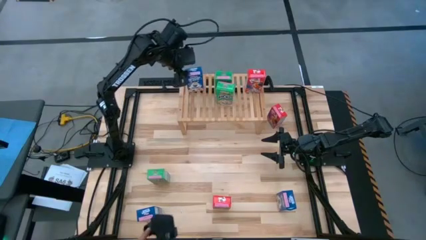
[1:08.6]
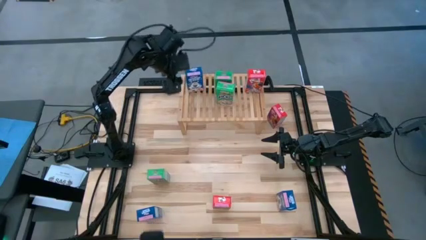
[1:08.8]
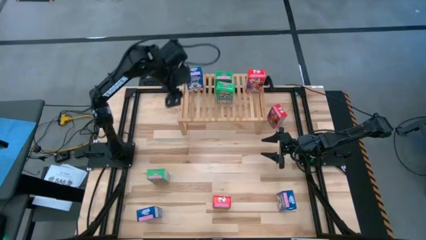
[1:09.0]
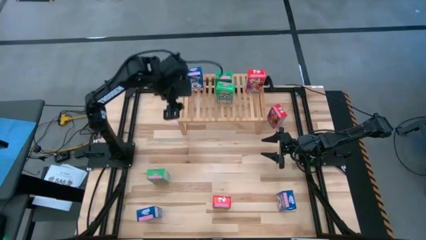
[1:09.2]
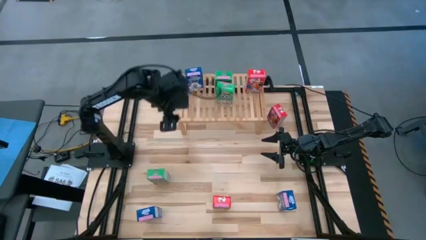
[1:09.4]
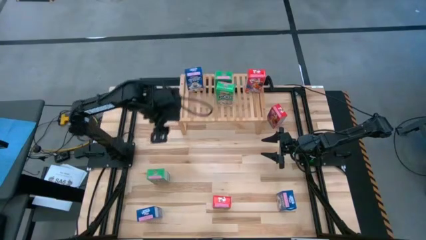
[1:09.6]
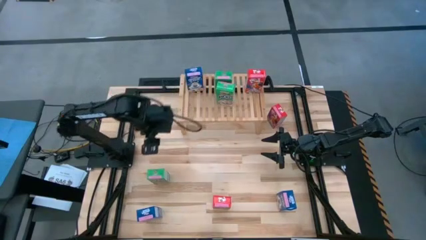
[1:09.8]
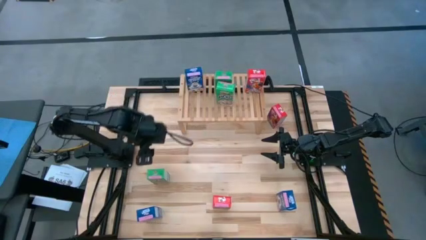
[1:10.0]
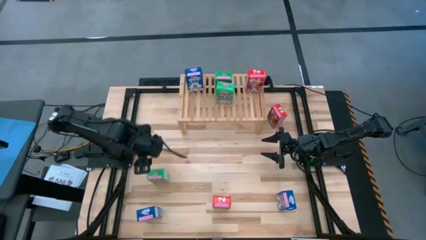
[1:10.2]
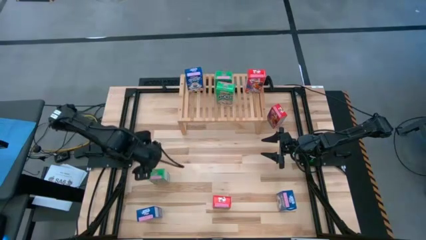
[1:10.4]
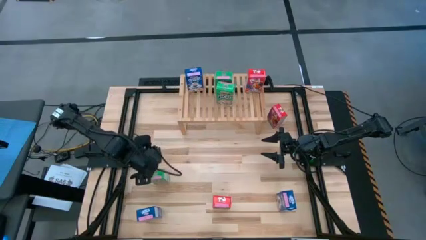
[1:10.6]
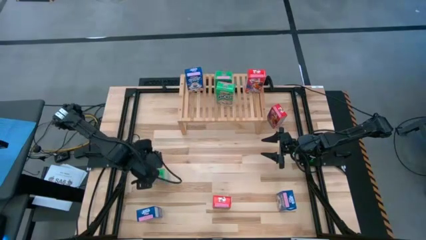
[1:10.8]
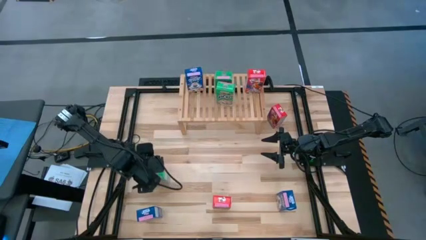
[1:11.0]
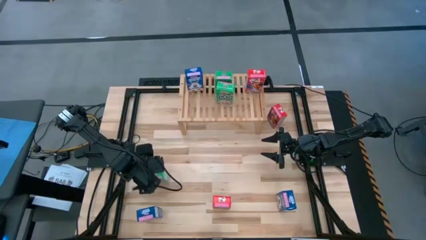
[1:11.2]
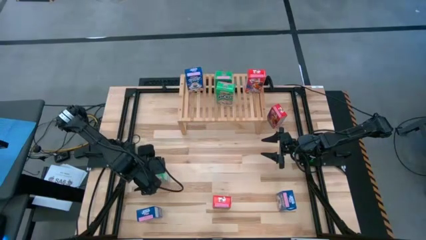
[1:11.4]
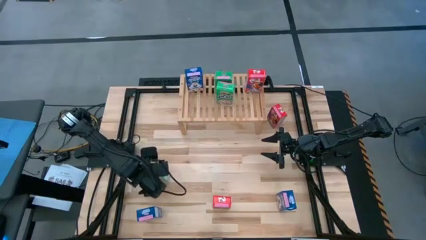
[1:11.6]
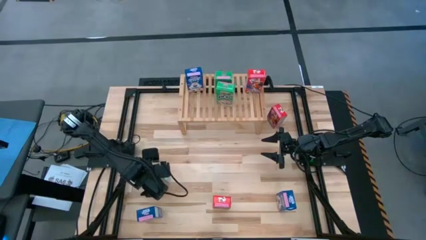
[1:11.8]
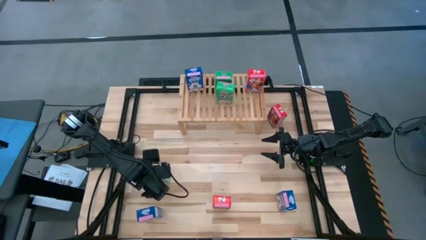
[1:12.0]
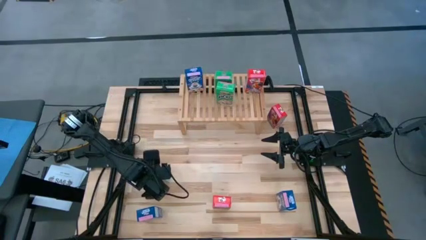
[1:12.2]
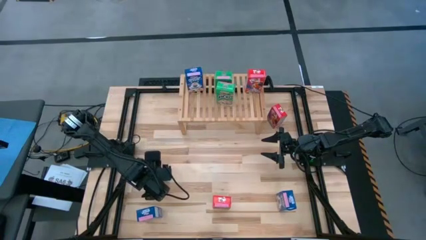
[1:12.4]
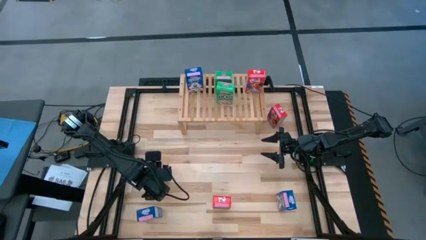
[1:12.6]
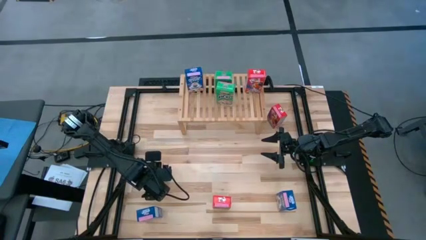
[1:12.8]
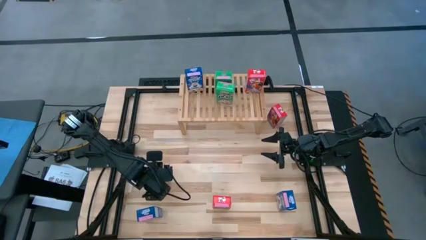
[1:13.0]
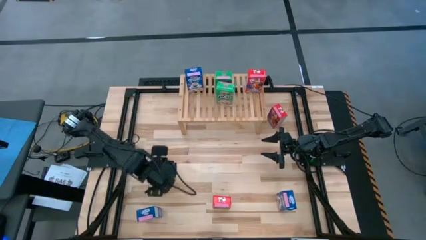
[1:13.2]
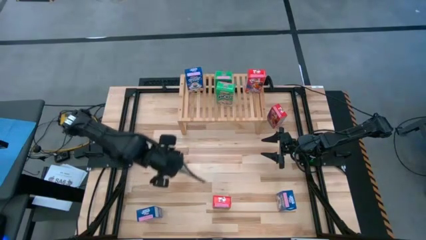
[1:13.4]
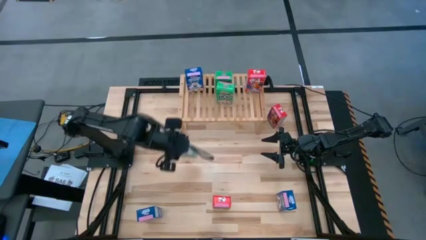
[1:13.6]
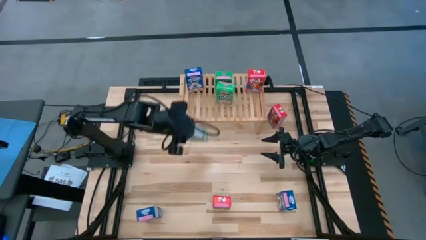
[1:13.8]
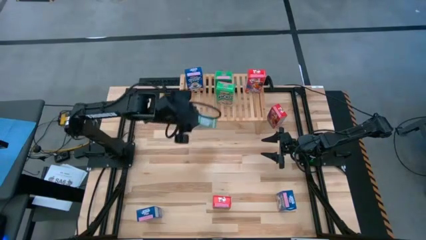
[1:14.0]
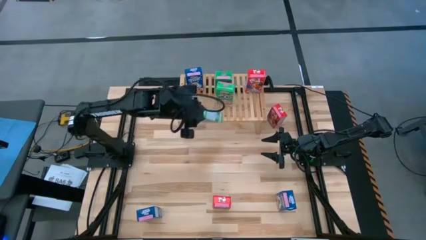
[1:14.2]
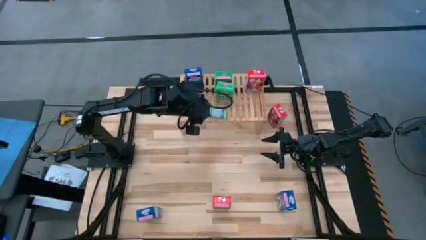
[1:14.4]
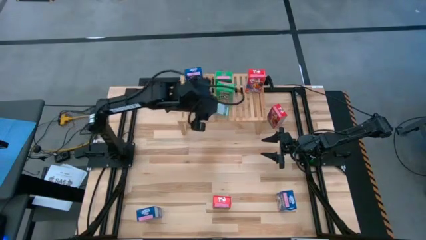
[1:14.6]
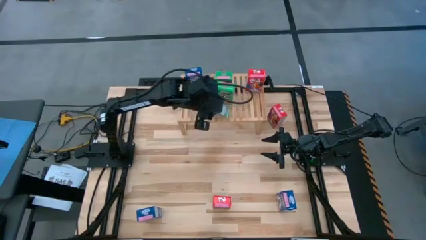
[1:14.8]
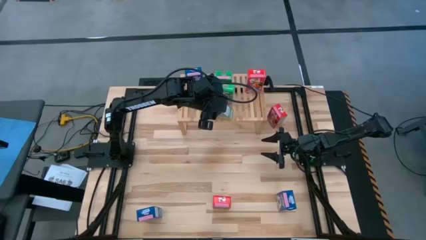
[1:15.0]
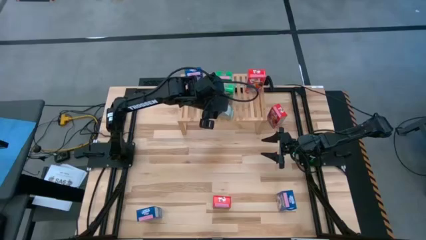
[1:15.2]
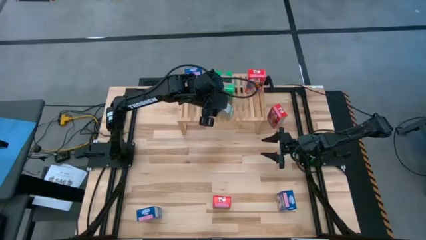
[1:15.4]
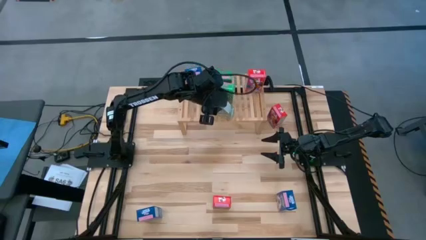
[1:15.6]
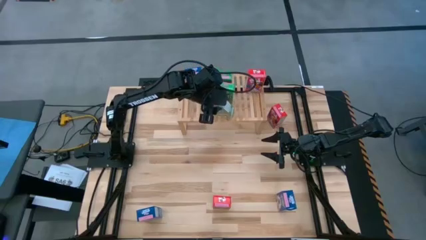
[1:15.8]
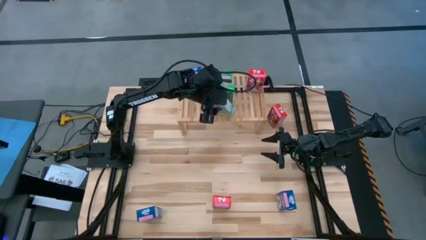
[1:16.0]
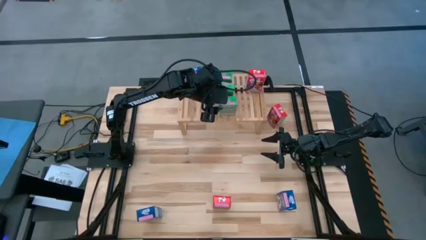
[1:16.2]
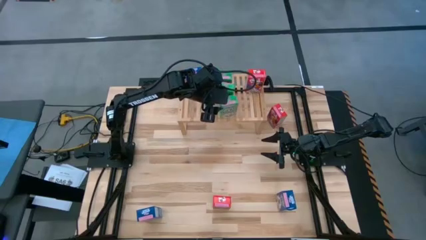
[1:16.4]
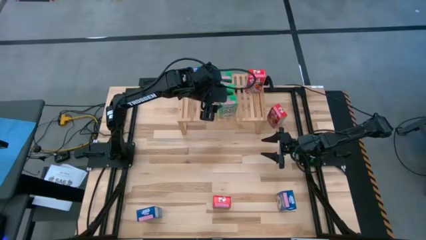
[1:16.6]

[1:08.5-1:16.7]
Task: Stack cereal on shelf
Put the green cereal box on the shelf aligned with the other green cereal box

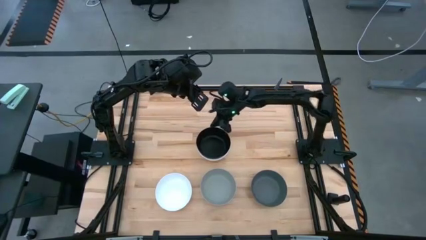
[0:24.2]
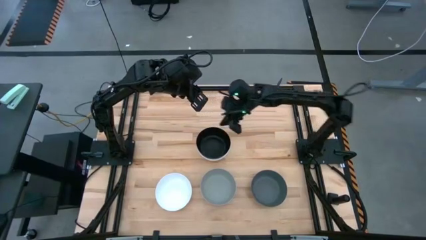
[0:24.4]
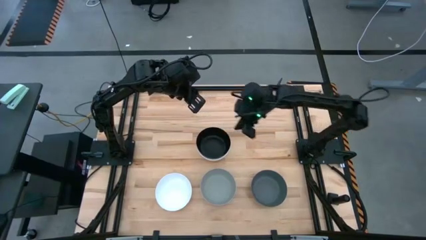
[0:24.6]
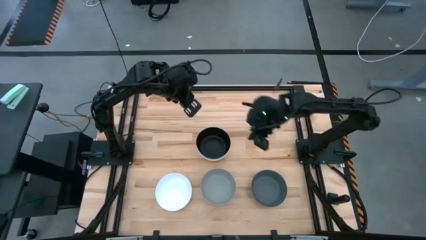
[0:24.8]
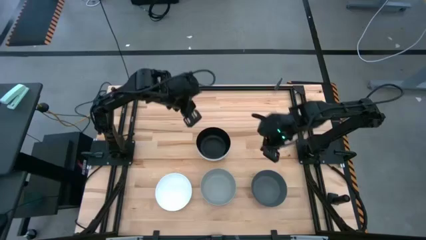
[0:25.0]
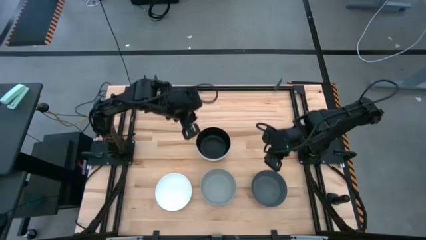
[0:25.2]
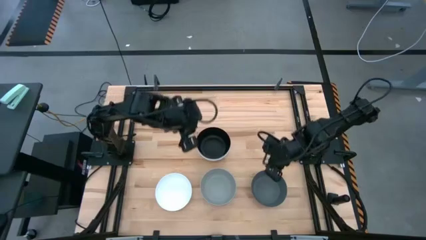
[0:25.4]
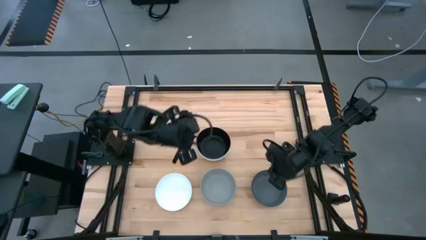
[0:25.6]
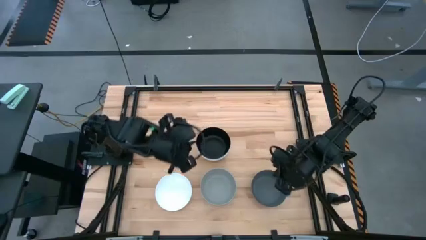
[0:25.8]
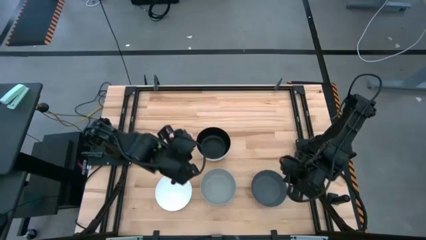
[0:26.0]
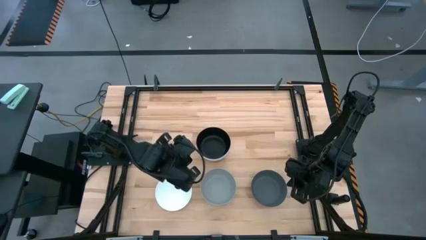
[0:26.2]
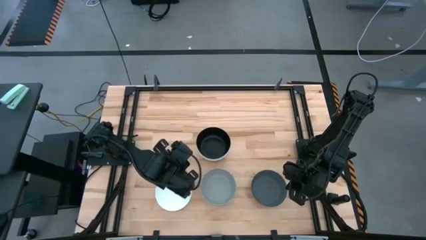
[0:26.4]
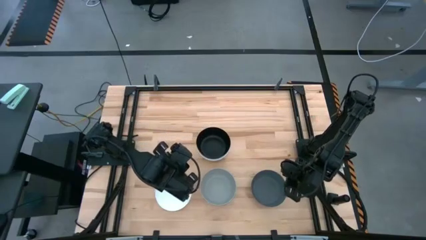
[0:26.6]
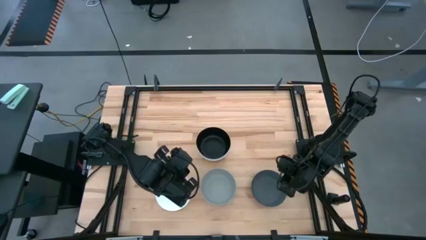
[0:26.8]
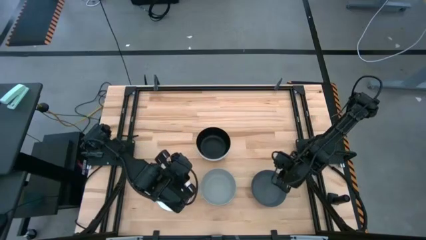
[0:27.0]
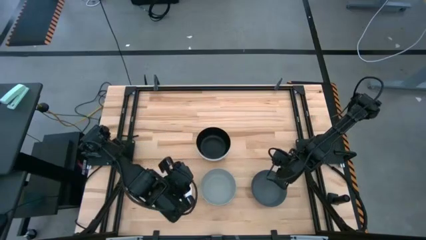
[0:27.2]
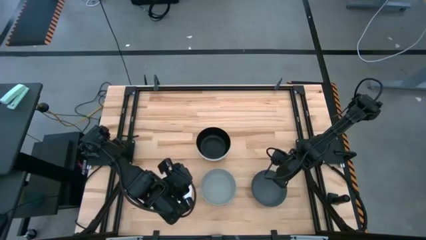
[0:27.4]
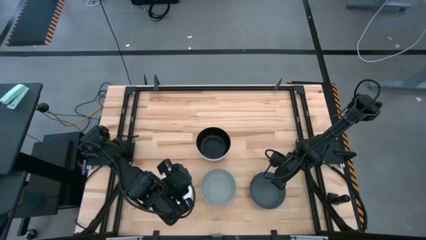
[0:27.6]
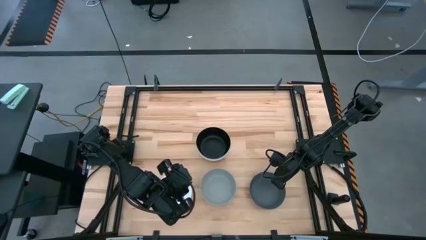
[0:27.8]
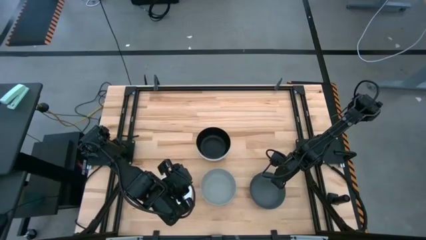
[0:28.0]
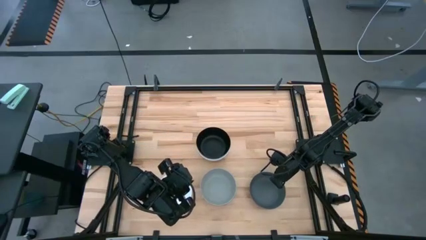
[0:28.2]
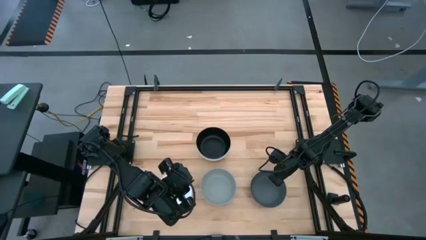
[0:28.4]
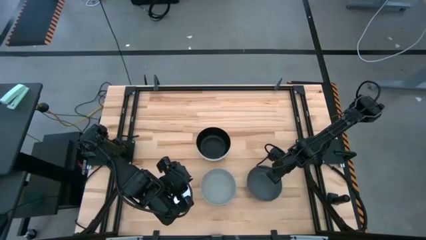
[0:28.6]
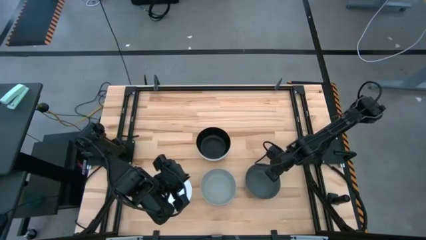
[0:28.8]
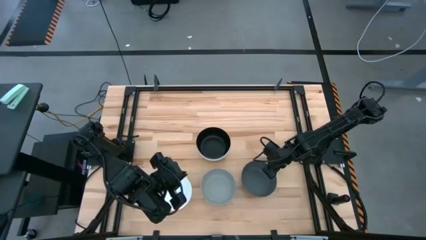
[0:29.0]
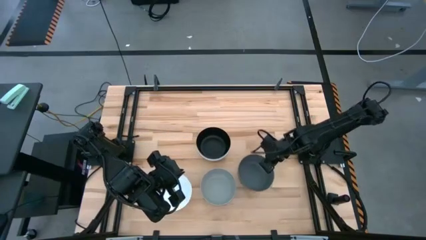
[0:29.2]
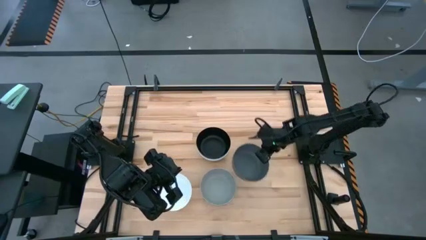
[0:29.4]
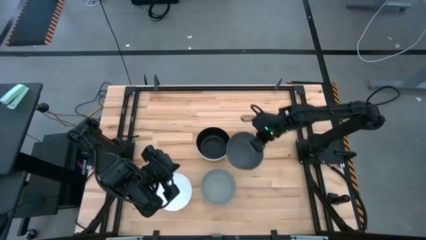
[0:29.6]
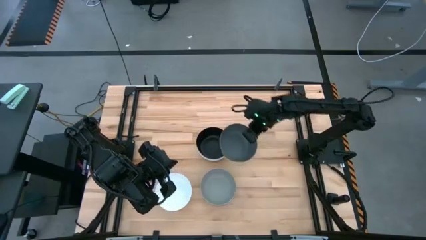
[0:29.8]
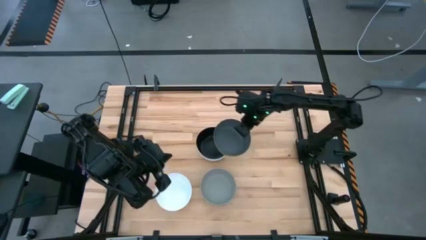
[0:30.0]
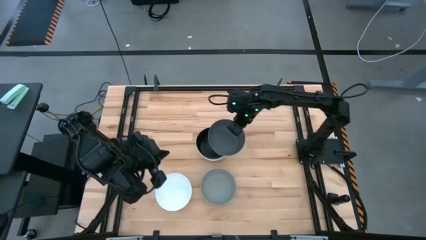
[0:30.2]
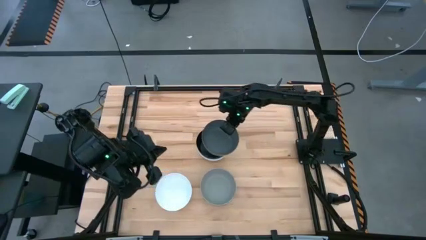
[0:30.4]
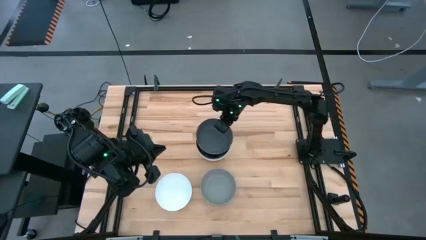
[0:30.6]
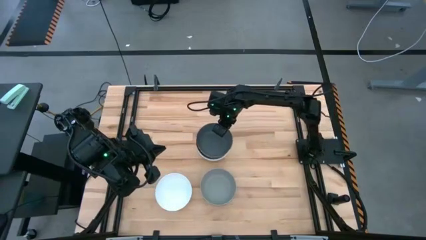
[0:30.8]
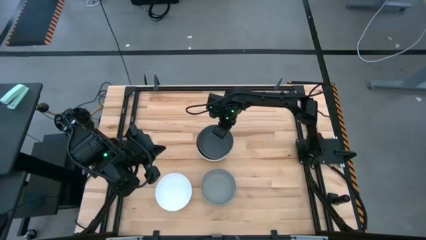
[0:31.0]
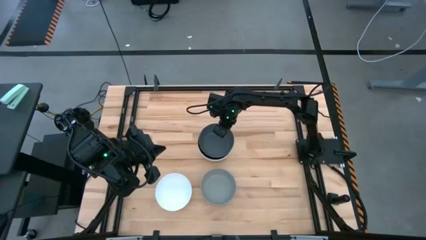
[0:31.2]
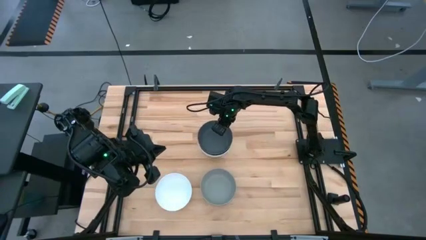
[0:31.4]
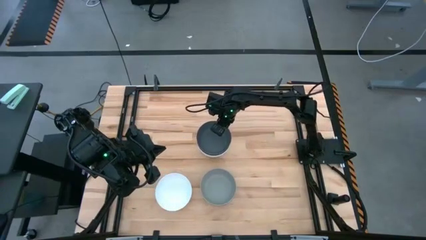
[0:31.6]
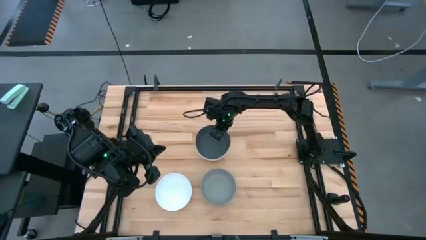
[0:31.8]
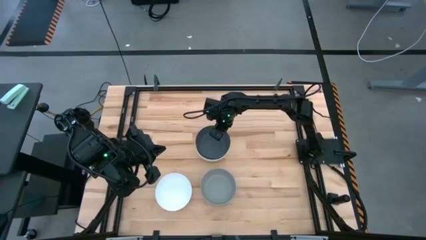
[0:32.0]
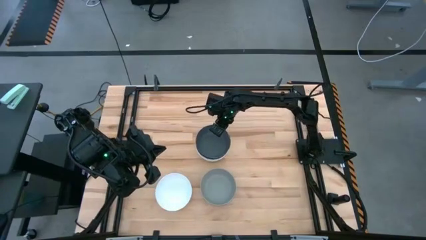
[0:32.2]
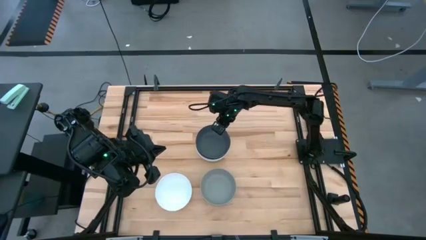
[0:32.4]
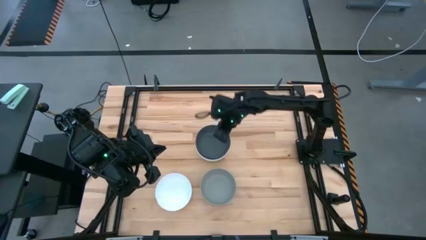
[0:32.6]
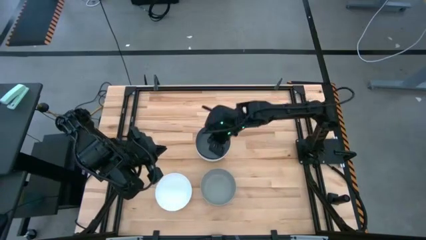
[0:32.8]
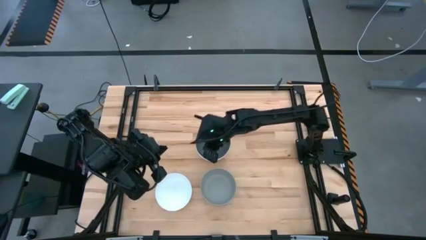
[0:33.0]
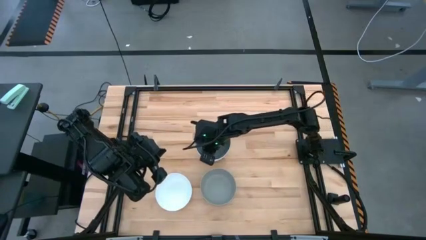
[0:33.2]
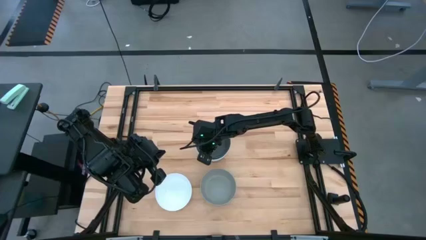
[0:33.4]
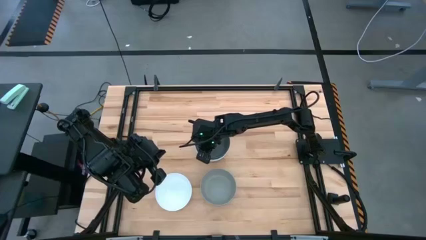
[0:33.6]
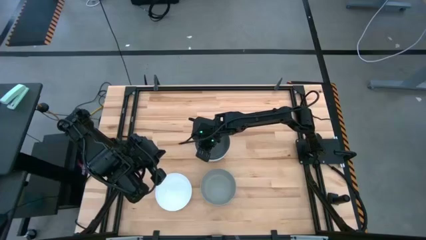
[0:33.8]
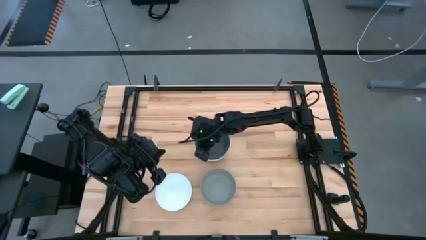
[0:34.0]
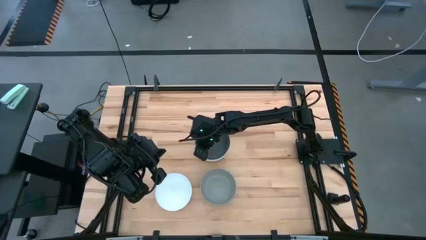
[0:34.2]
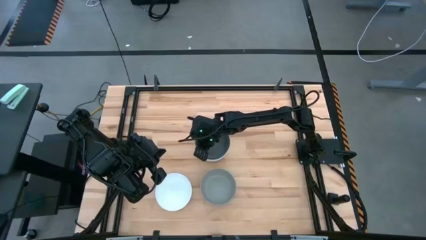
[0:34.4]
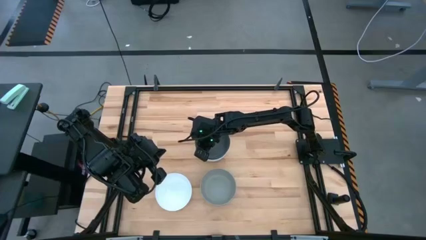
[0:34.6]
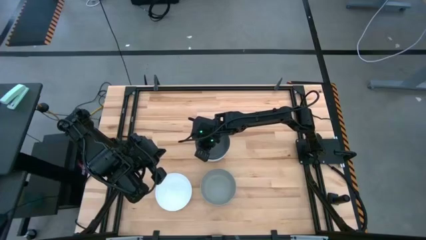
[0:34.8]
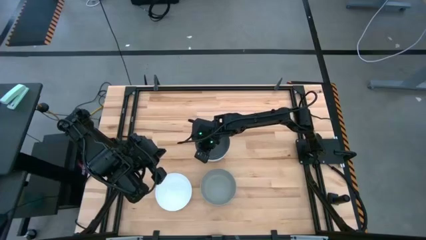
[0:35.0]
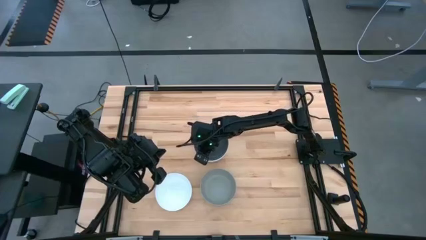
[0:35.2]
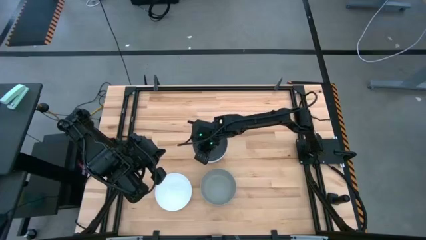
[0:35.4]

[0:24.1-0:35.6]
Task: Nest bowls inside each other
Stack the gray bowl on top of the black bowl
